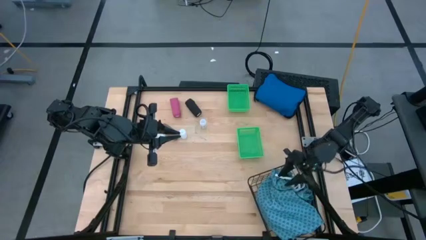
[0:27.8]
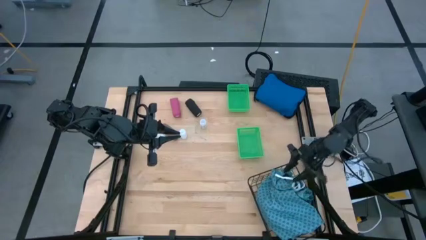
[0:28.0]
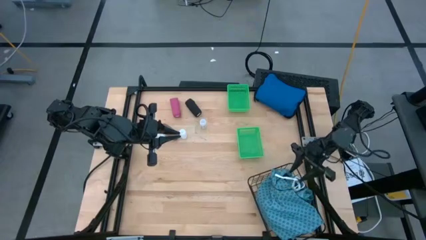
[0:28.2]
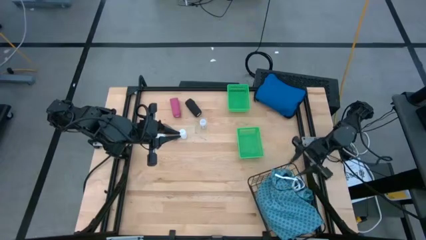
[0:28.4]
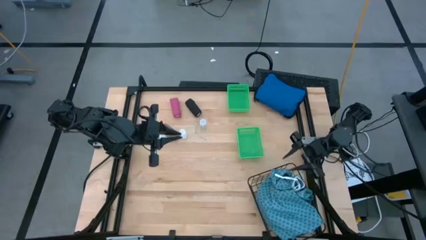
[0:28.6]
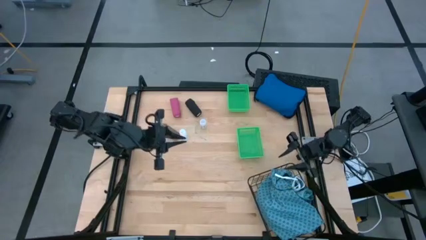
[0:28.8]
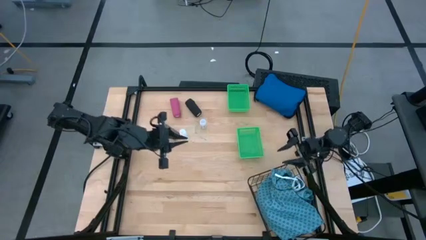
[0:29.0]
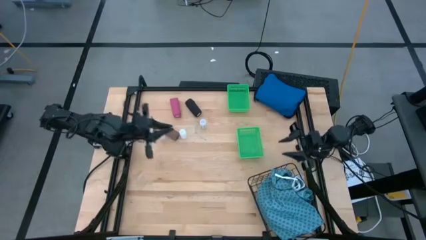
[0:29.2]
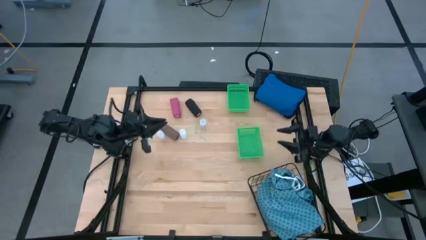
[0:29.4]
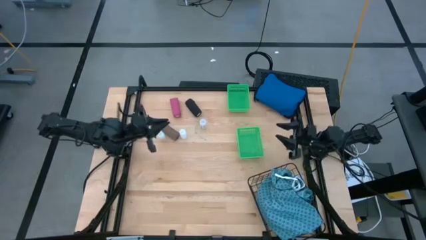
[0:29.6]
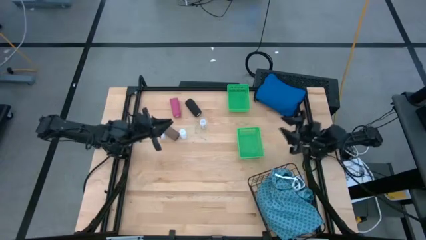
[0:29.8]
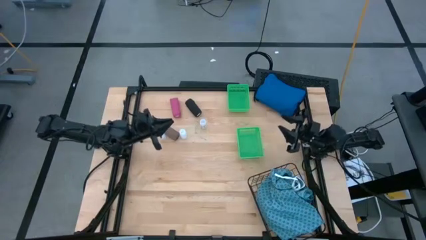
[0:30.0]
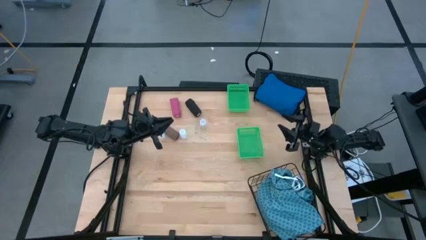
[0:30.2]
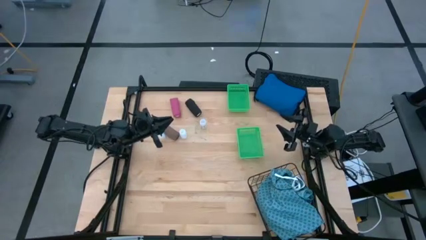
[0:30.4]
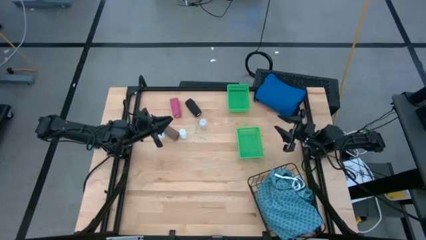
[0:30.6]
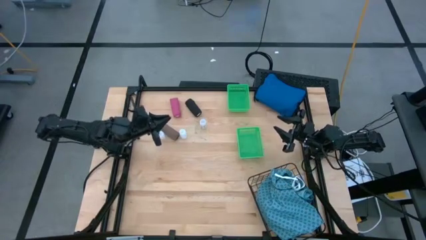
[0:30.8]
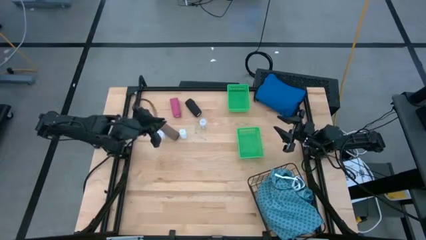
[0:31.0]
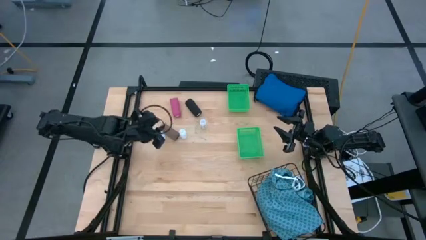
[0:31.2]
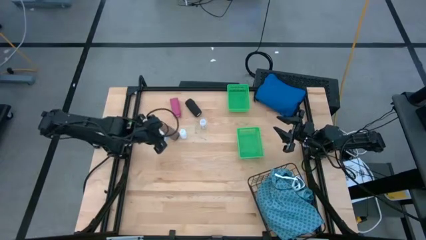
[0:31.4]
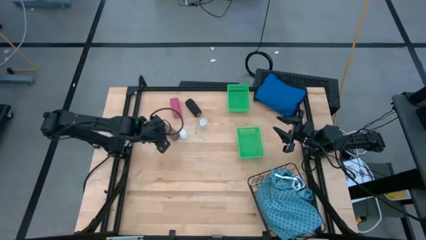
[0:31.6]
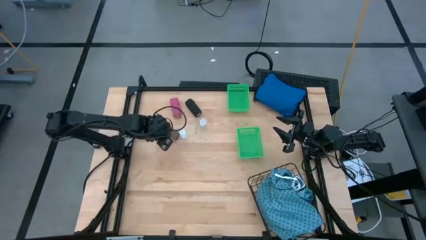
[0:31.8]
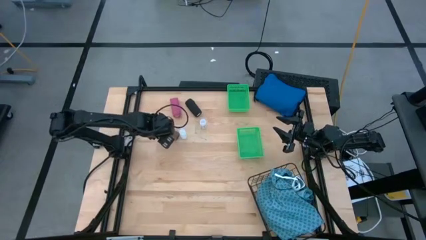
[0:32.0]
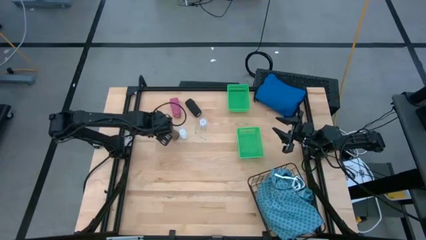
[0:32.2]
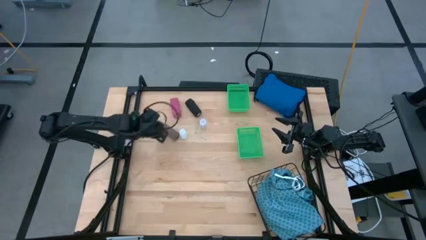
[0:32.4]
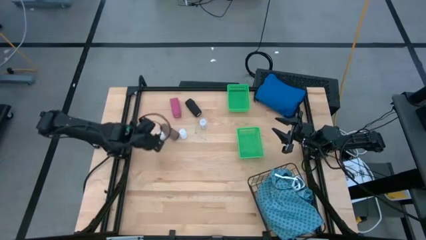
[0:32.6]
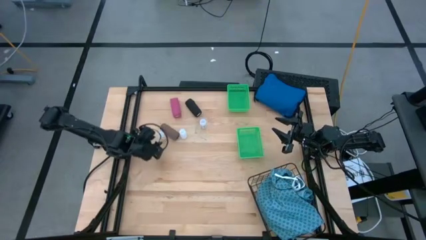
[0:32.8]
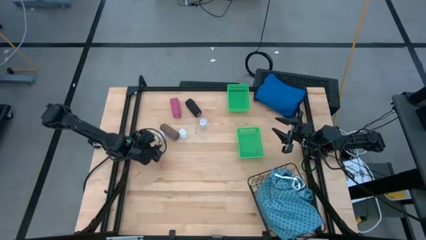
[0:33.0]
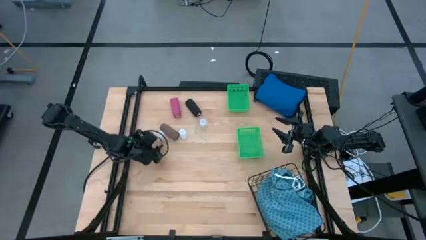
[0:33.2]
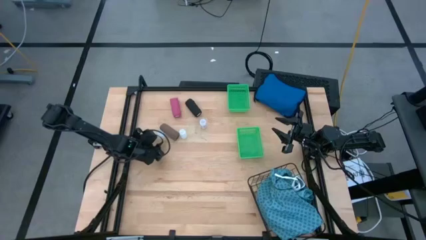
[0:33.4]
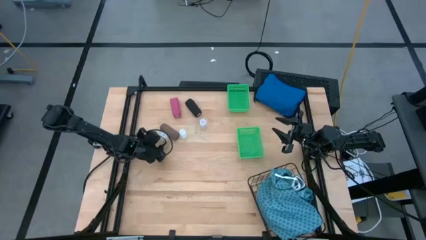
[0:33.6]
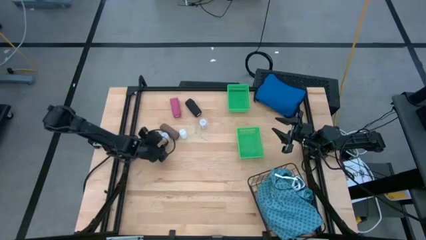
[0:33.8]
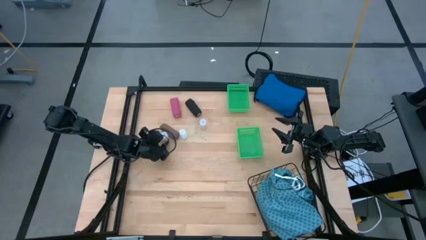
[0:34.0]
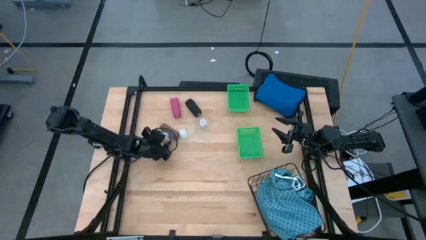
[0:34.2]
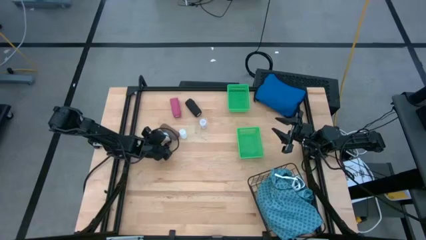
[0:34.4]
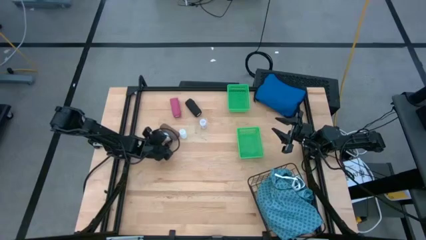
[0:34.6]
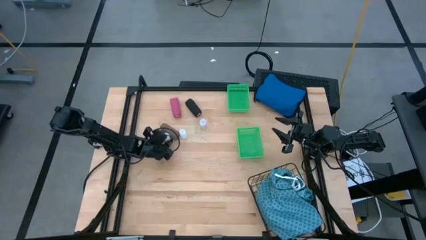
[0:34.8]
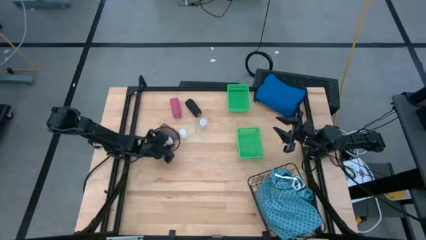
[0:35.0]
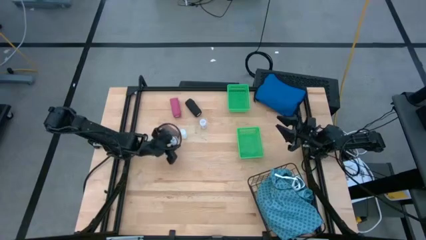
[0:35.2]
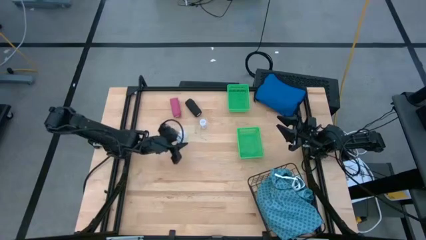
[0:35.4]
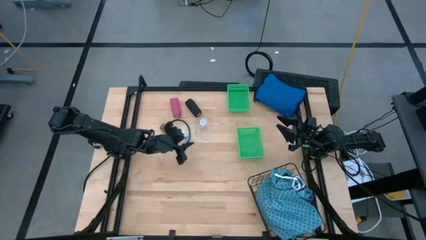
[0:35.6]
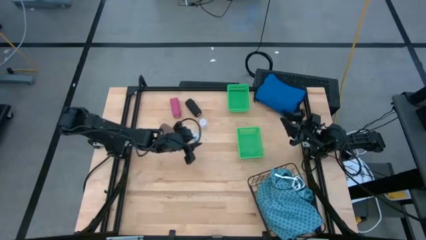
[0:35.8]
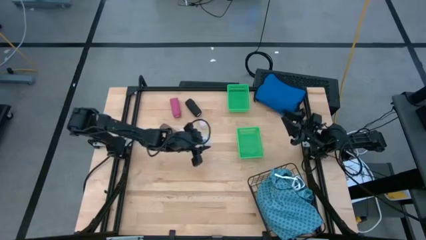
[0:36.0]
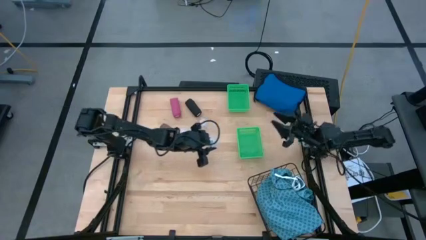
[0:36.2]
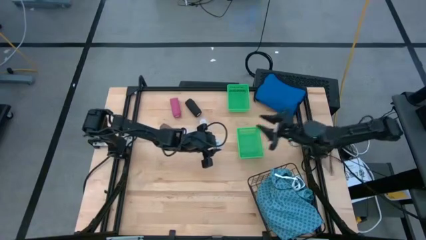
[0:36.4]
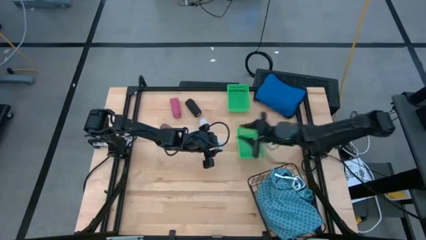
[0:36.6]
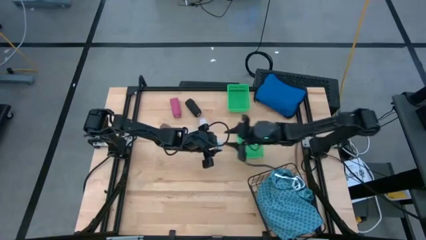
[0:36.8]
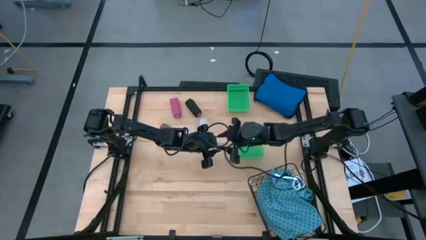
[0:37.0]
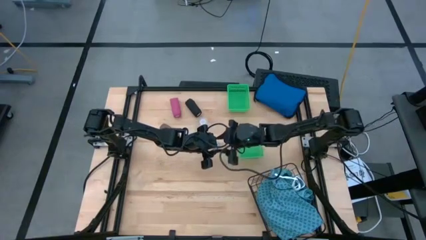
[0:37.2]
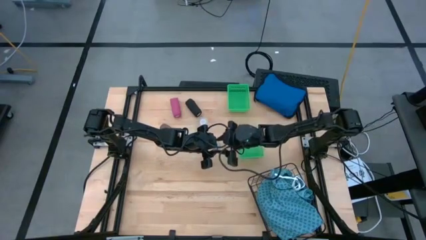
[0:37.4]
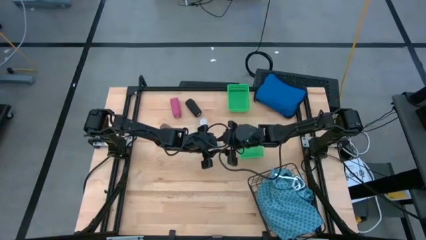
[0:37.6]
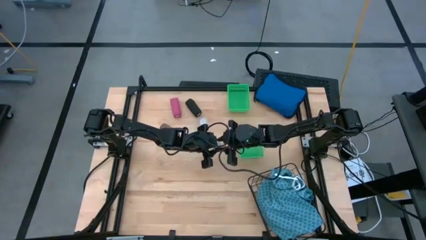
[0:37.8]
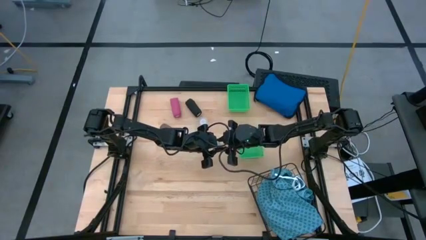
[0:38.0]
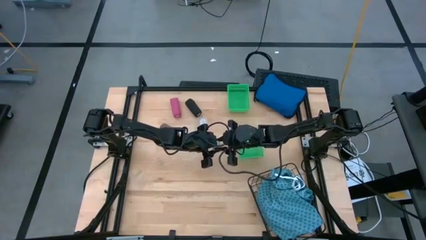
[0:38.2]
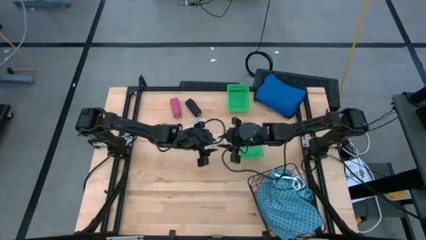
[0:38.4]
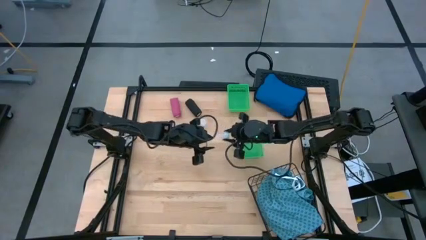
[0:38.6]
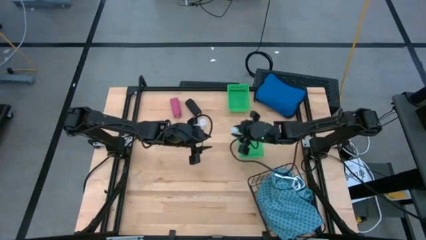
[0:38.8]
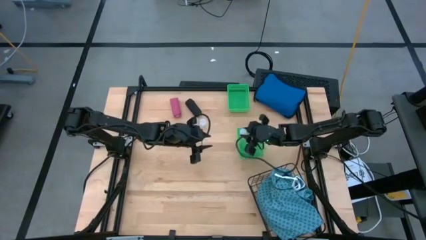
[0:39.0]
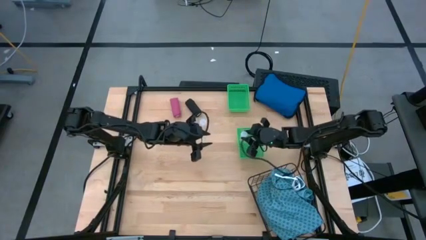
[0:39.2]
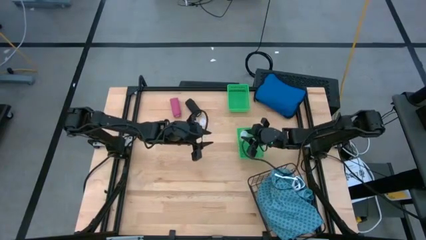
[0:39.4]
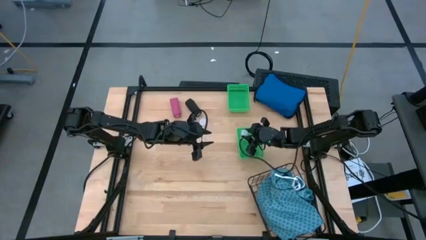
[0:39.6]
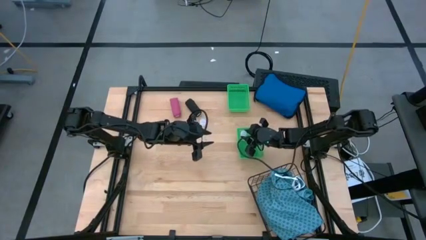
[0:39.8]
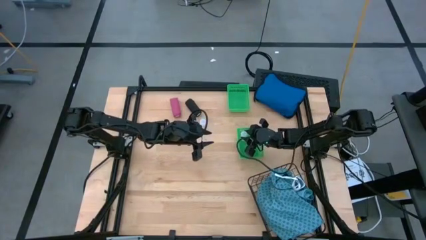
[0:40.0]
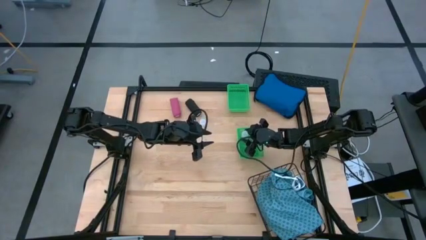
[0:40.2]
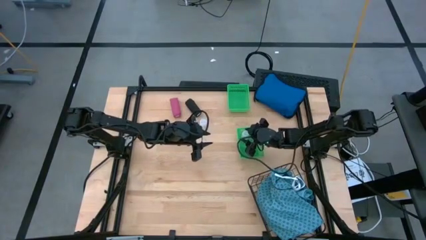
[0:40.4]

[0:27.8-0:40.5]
Task: Pick & Place Medicine items
Put the left transparent pill bottle into the bottom green bin
